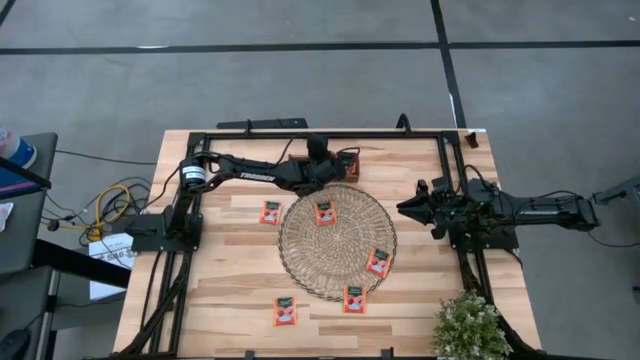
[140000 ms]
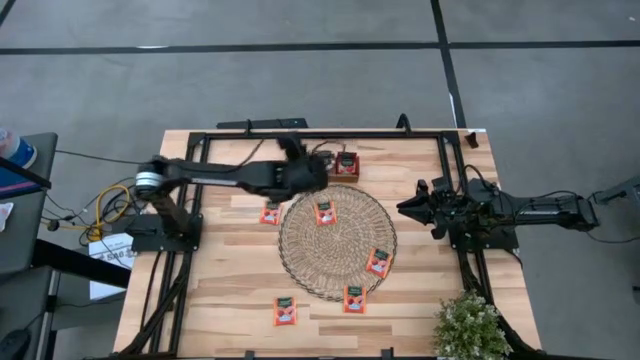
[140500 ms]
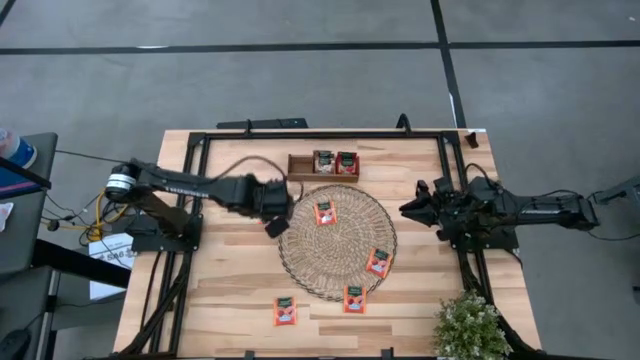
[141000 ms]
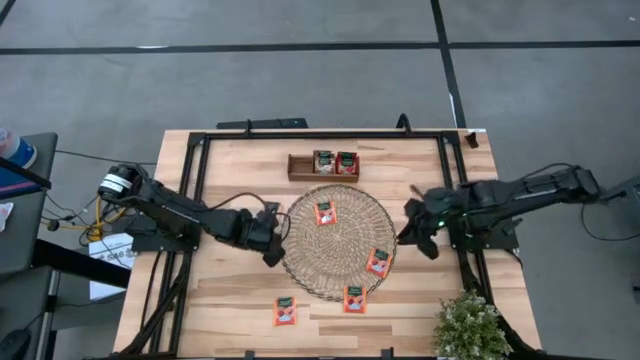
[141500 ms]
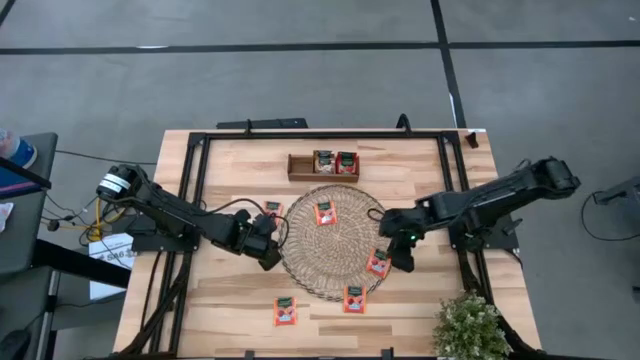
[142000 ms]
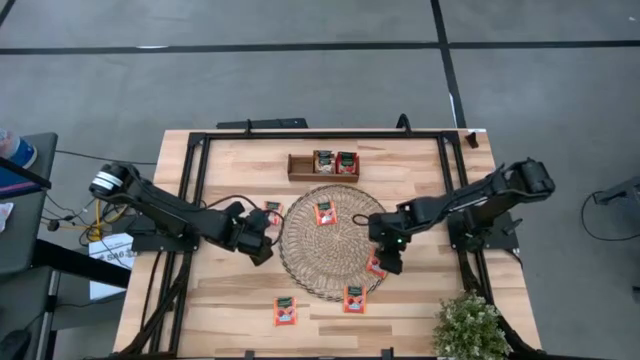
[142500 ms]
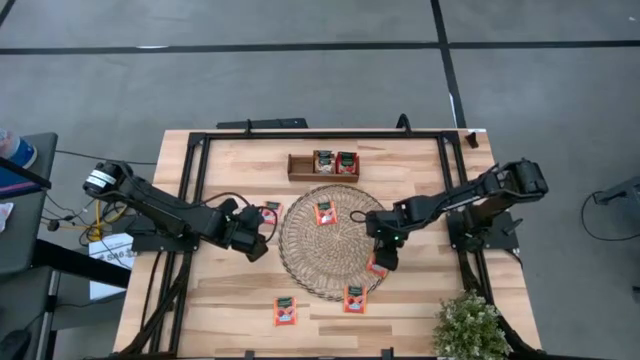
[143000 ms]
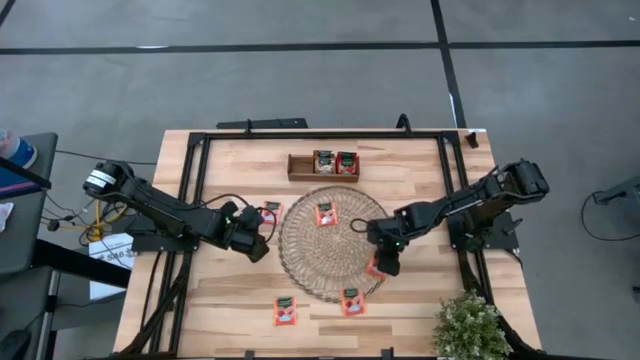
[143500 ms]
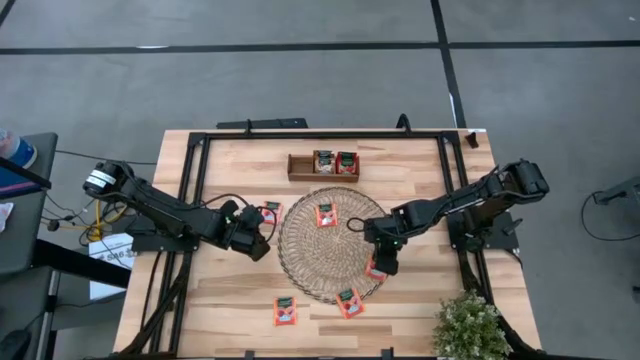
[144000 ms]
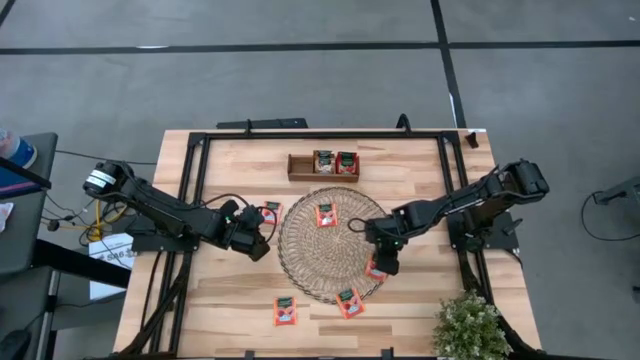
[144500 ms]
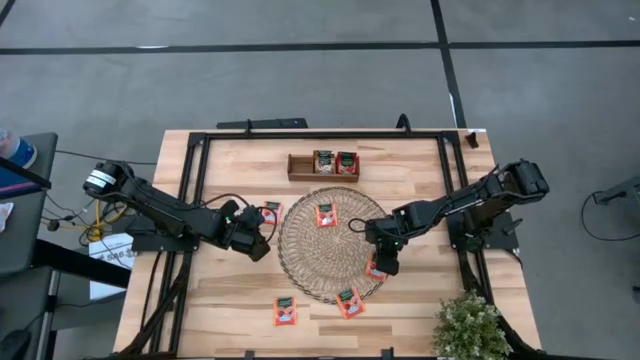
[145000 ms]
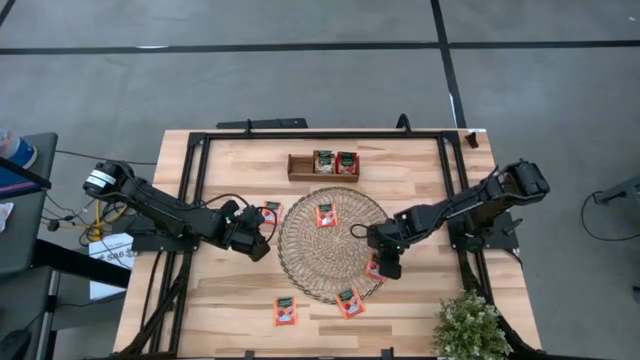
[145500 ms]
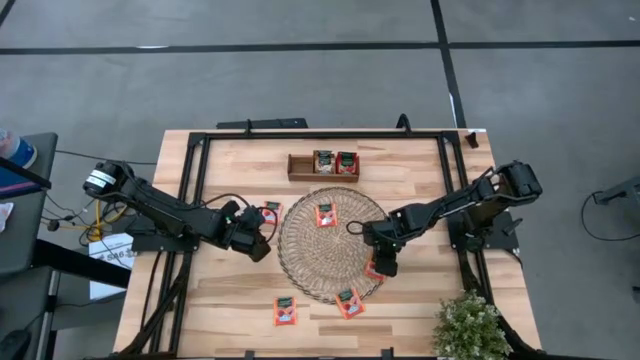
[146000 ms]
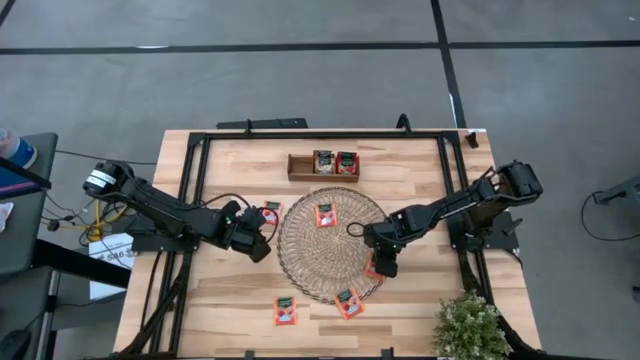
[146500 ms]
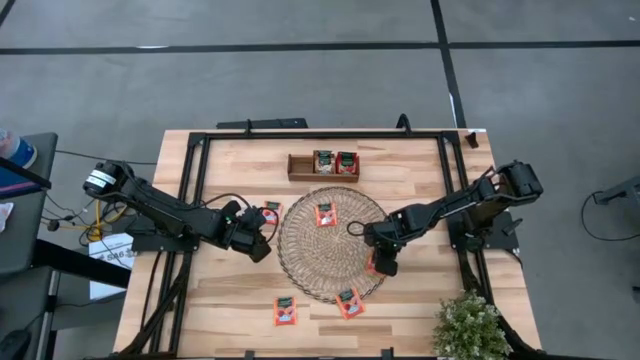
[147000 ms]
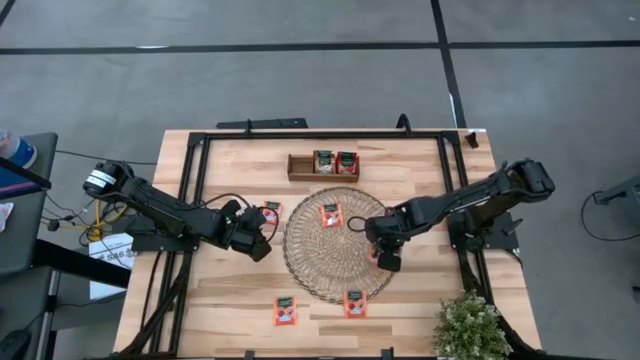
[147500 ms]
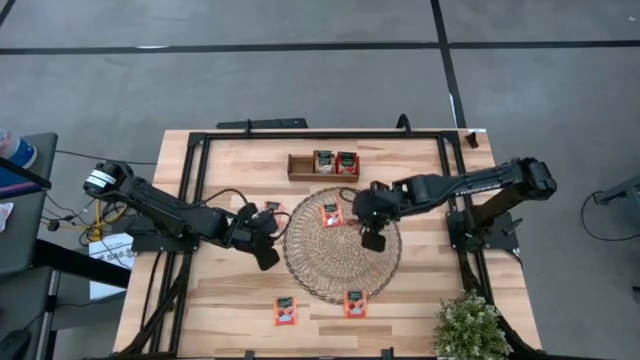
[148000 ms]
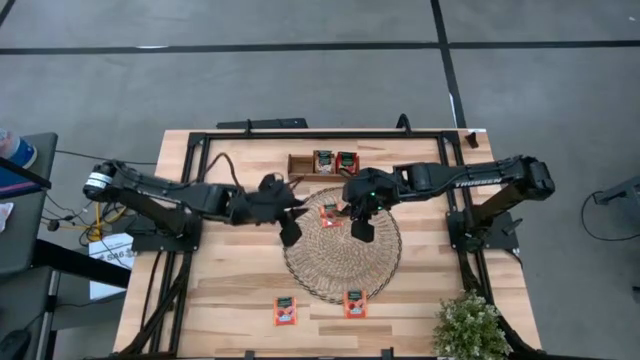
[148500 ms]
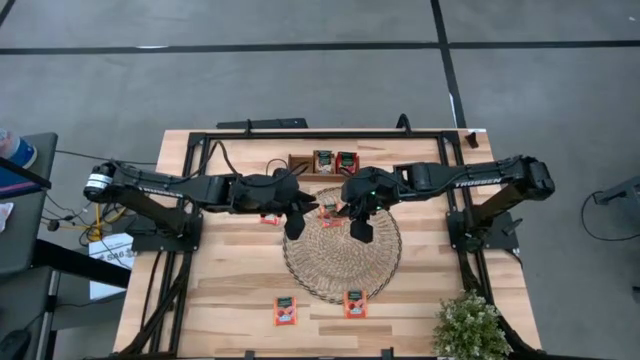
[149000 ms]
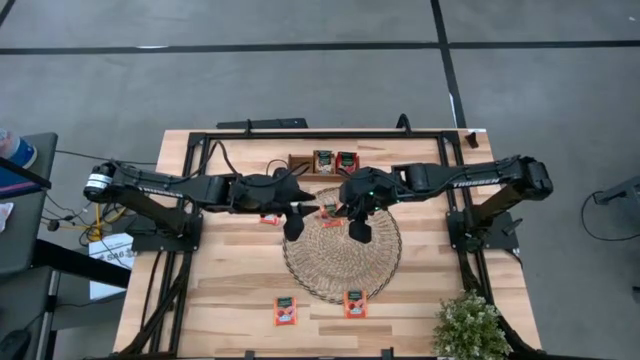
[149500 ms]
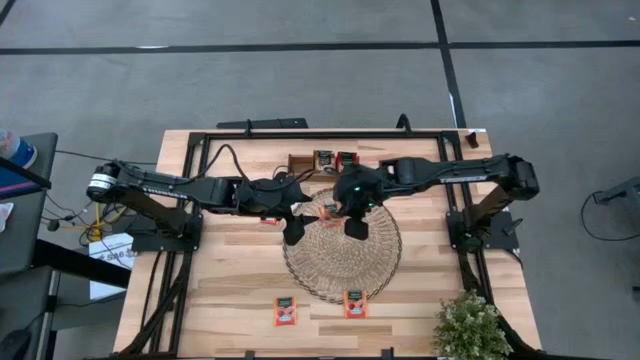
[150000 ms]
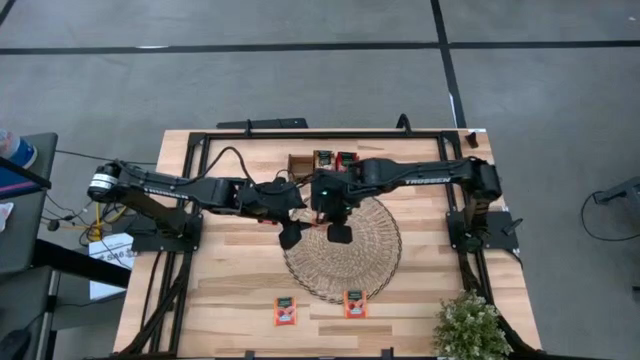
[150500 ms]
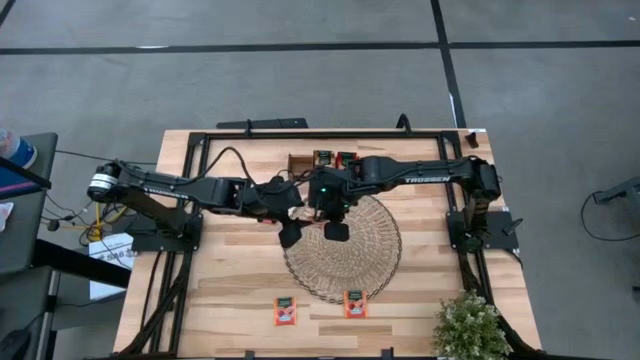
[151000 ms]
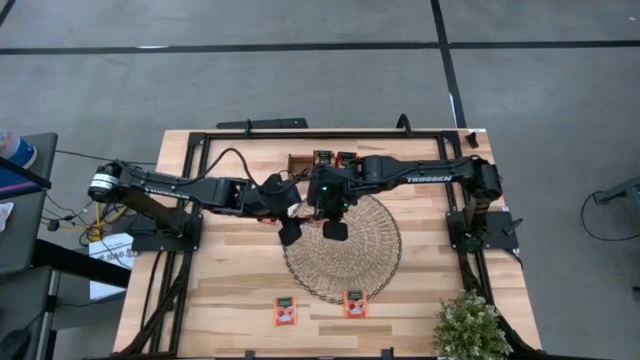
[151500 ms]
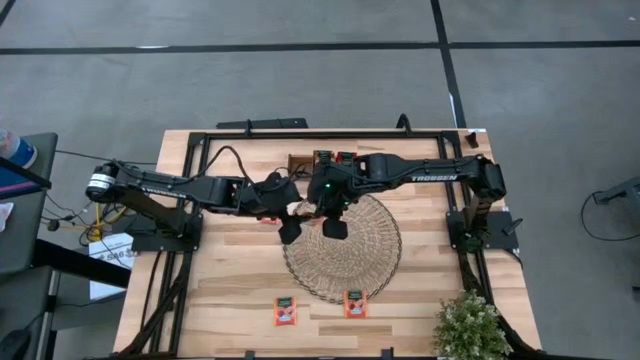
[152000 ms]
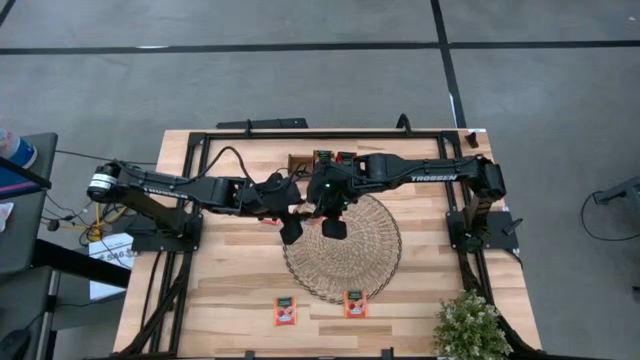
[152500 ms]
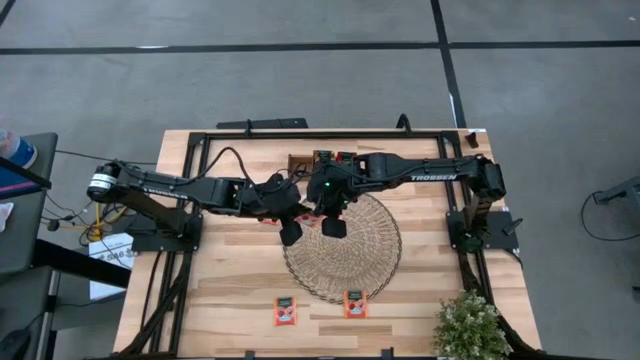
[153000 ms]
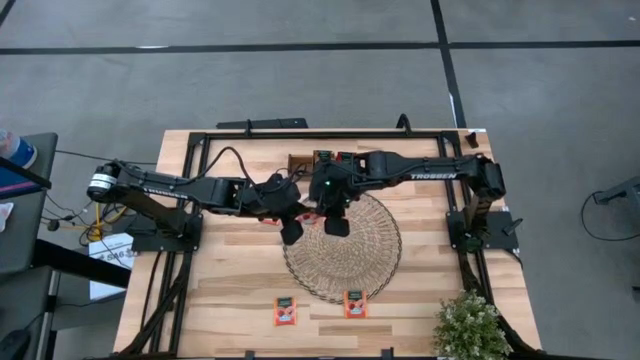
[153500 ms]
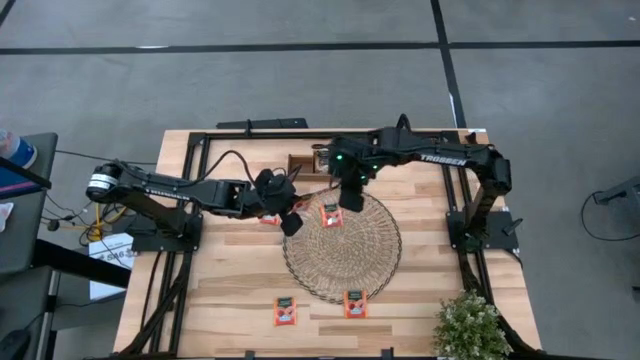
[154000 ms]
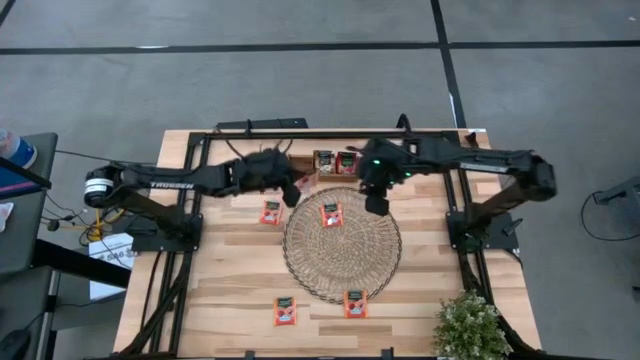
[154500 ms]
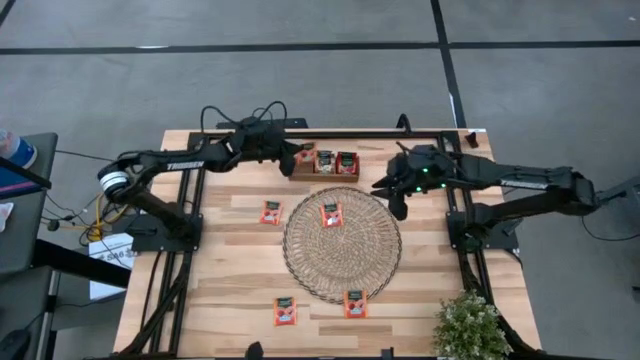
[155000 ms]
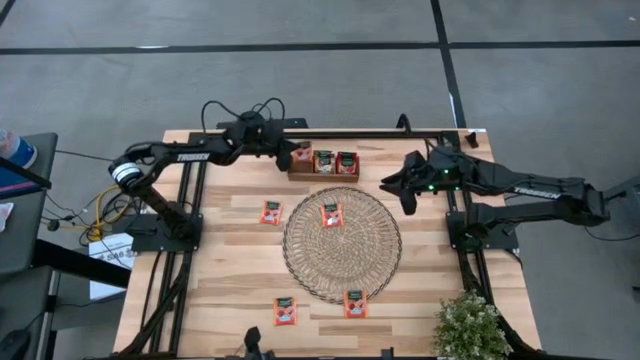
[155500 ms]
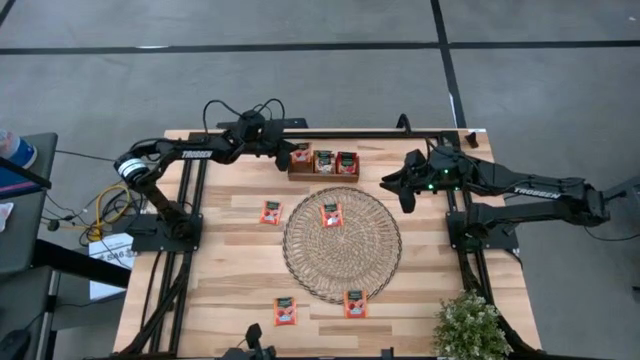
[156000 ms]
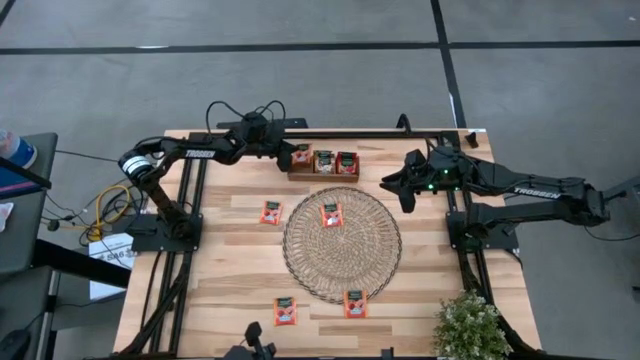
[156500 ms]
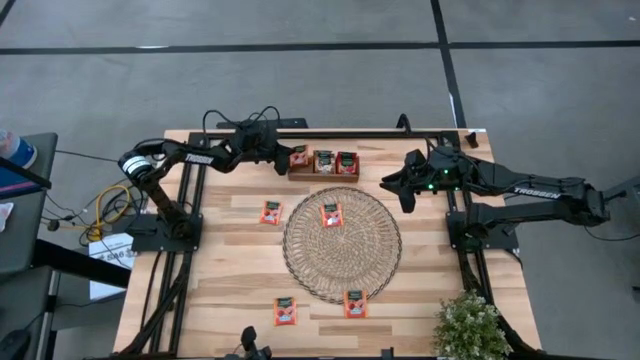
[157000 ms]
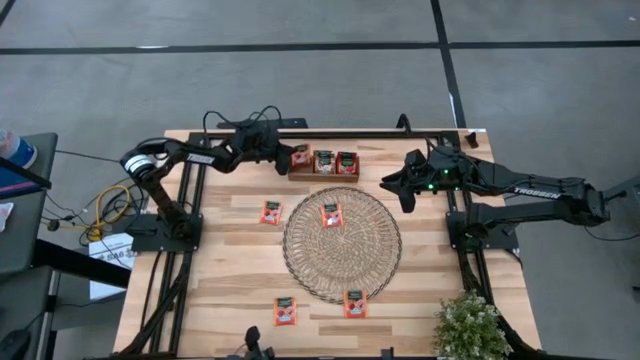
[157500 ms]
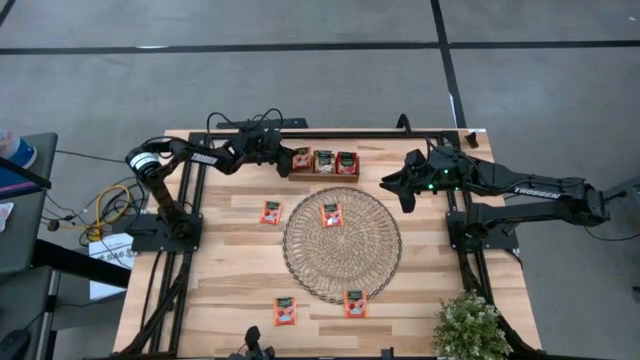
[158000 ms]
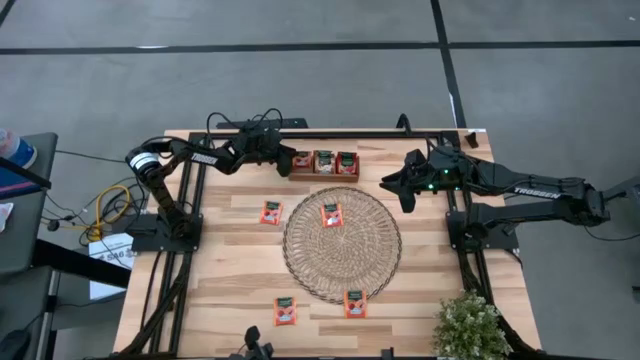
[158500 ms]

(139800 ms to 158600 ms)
Task: Pick & Place Tea
Put the orange tea bag into the left section of the brown wooden organizer

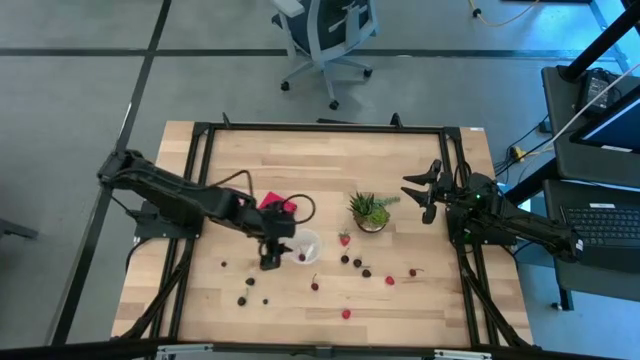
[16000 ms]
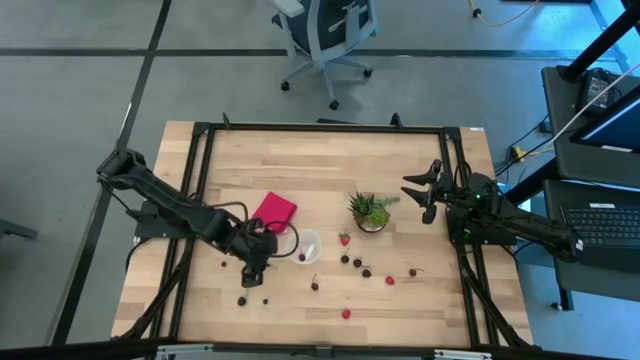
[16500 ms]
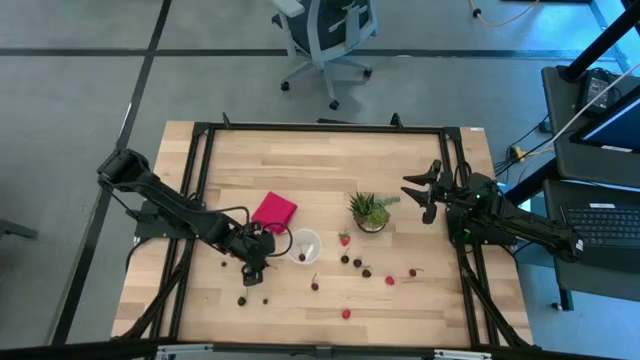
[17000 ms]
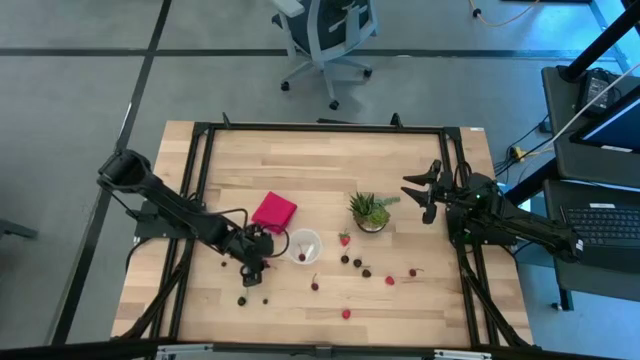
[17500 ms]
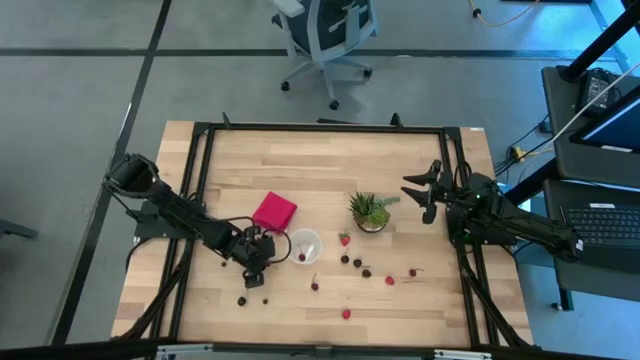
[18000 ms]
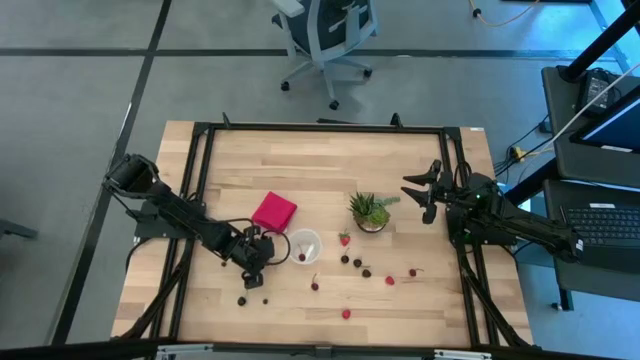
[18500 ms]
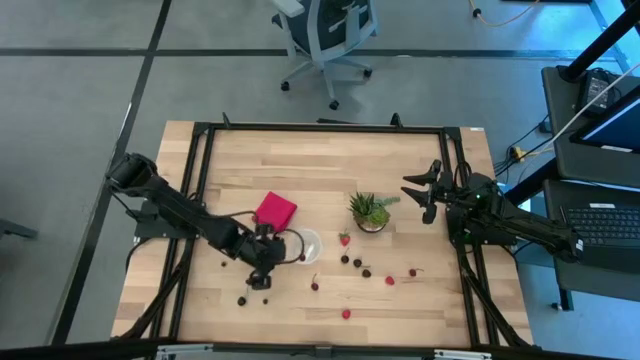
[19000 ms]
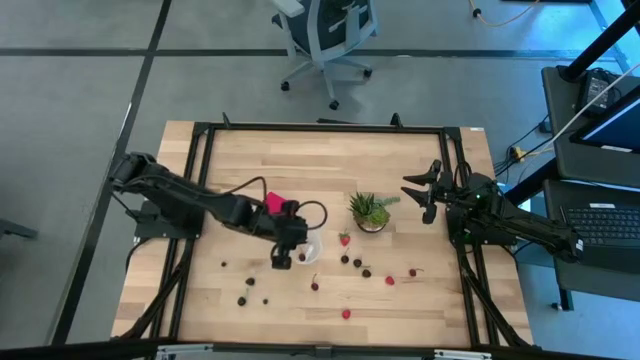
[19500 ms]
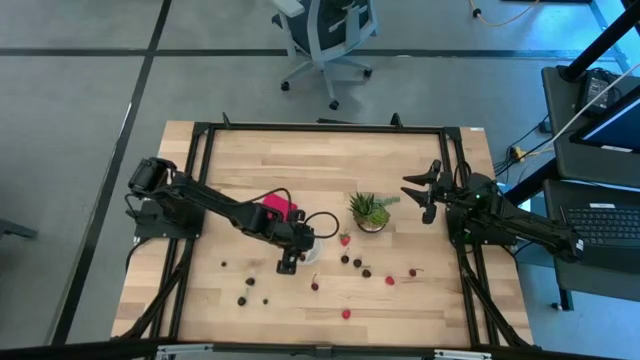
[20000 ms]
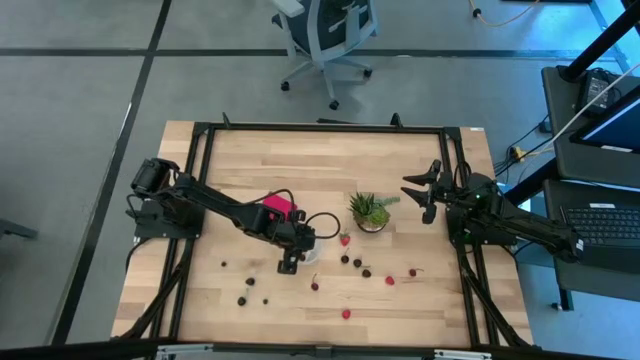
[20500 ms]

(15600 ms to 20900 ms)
Task: Pick and placing Produce into tupperware
Put the red cherry into the container
